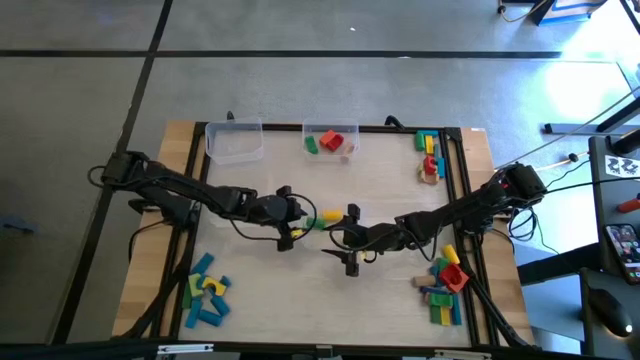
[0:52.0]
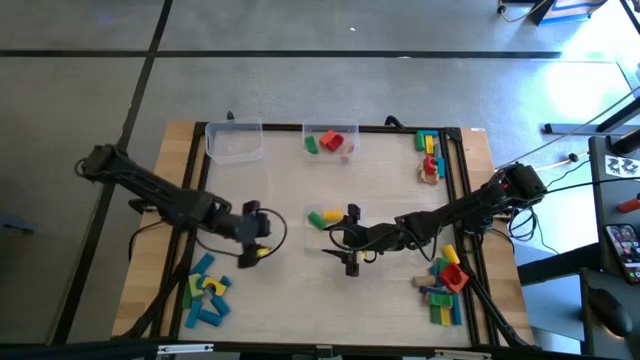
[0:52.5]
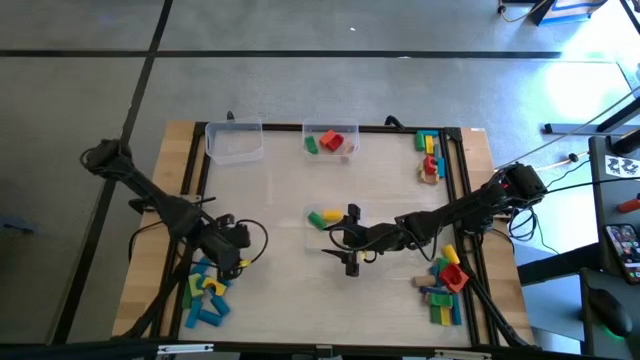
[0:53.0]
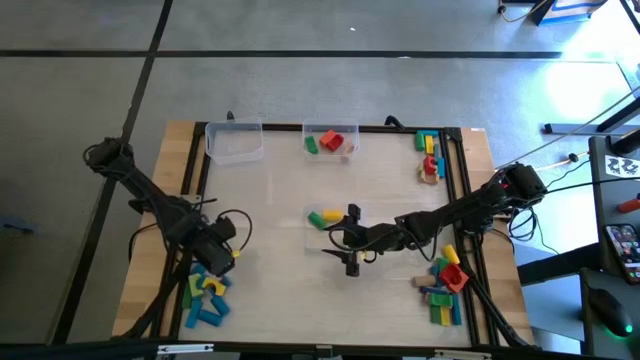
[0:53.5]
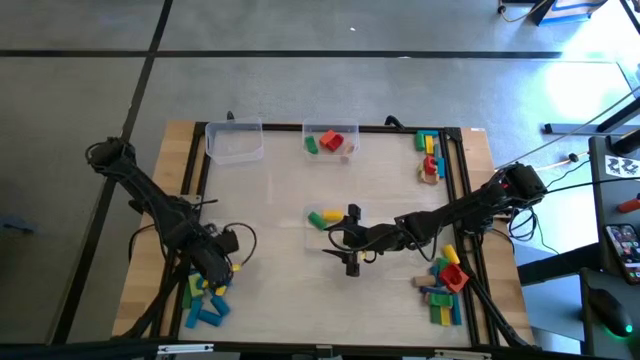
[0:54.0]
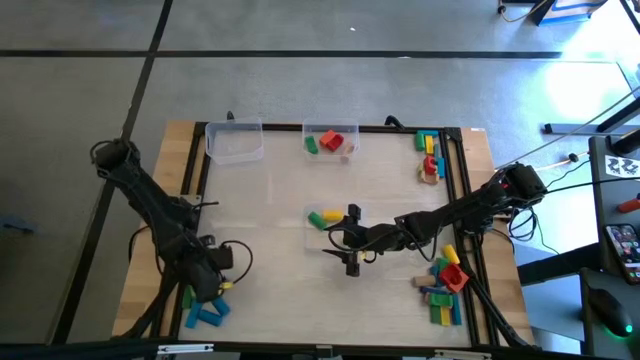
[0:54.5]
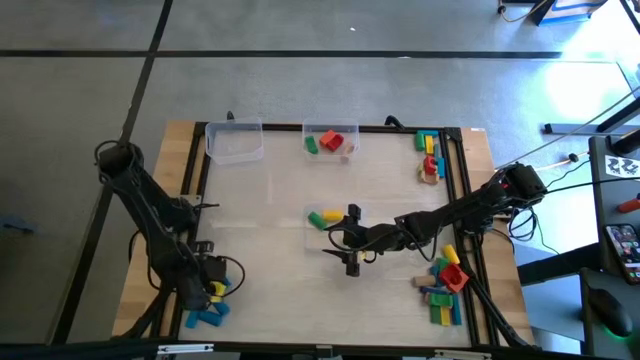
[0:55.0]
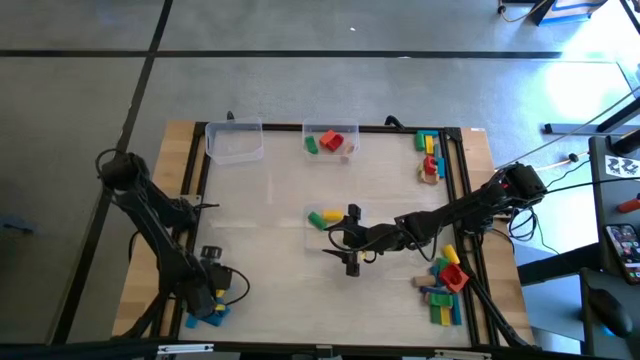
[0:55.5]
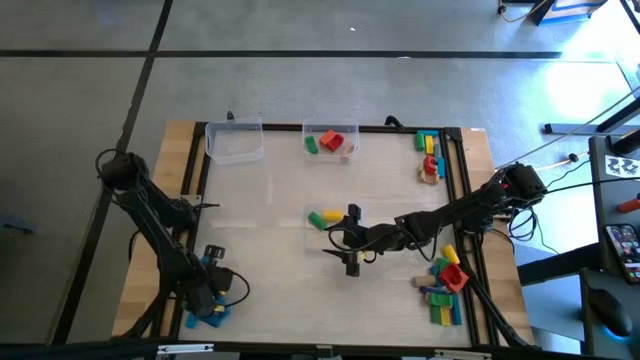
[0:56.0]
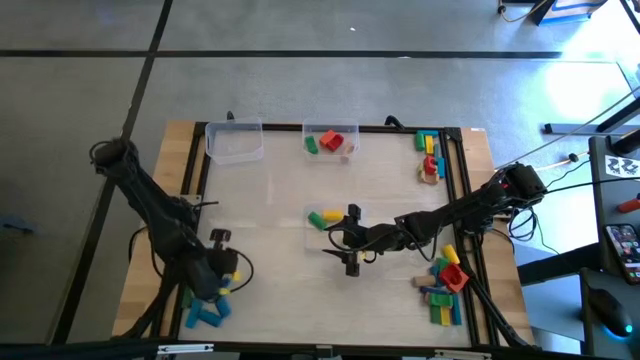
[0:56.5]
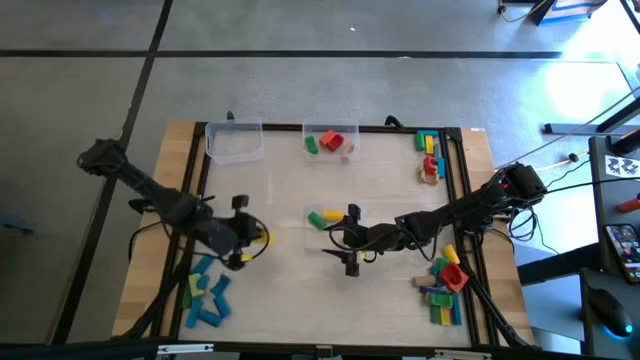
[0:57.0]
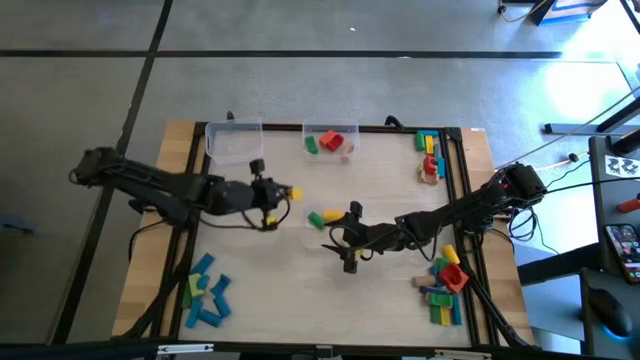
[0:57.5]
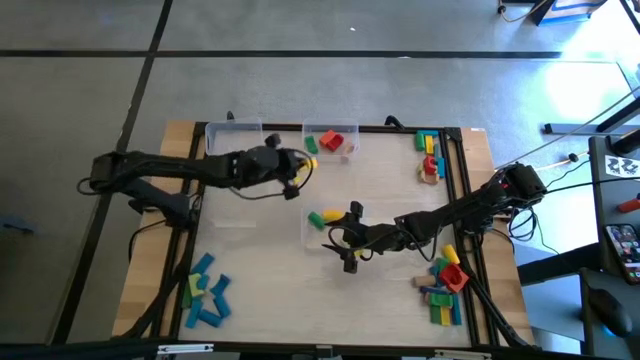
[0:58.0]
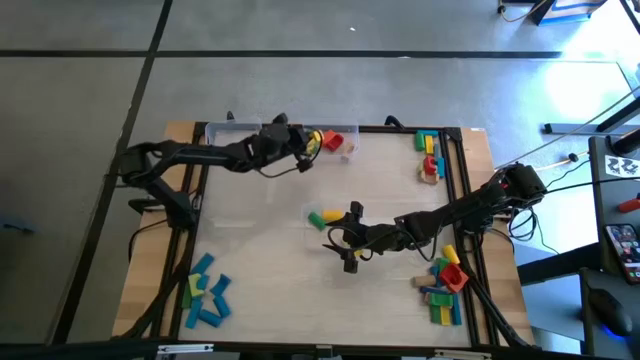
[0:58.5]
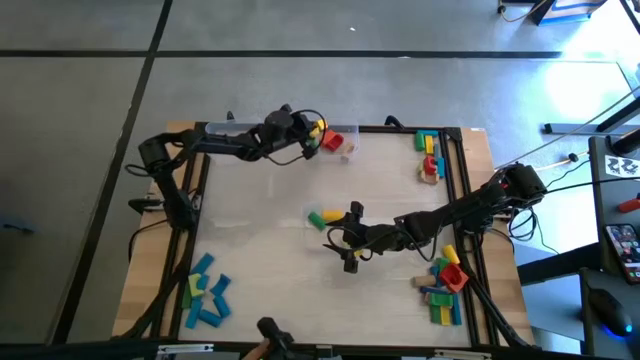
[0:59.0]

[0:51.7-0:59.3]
Task: Sort blocks by size
Put the yellow arch block into the top right transparent bin

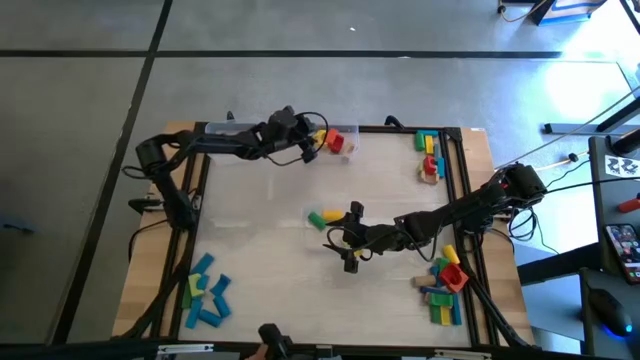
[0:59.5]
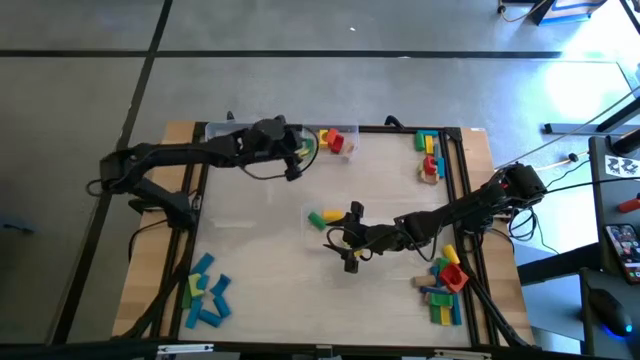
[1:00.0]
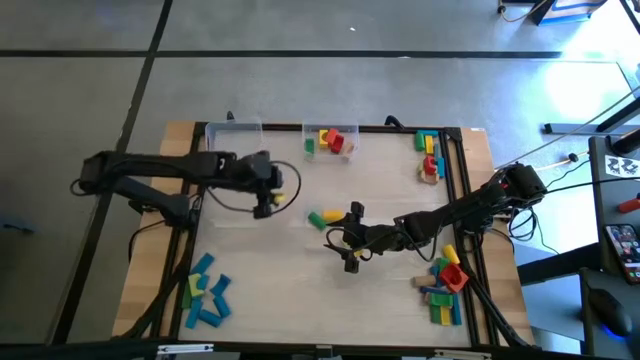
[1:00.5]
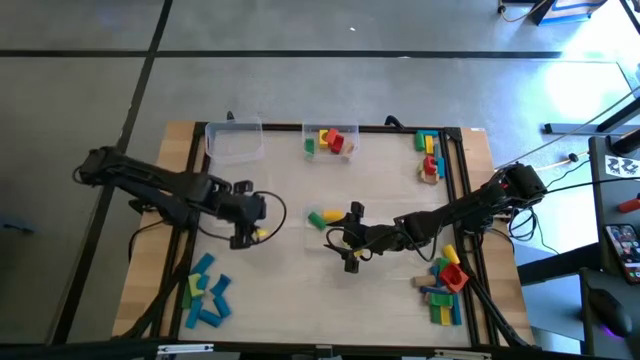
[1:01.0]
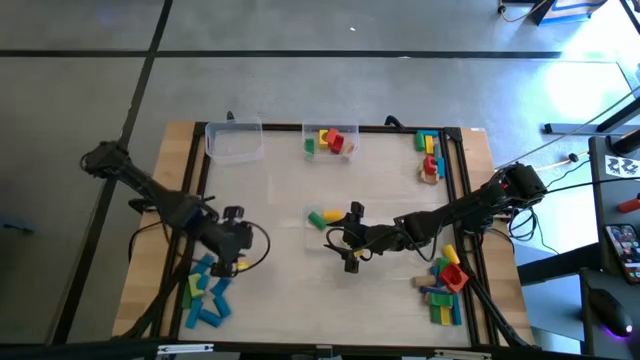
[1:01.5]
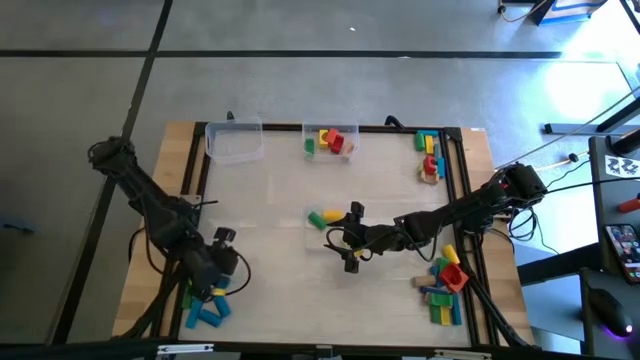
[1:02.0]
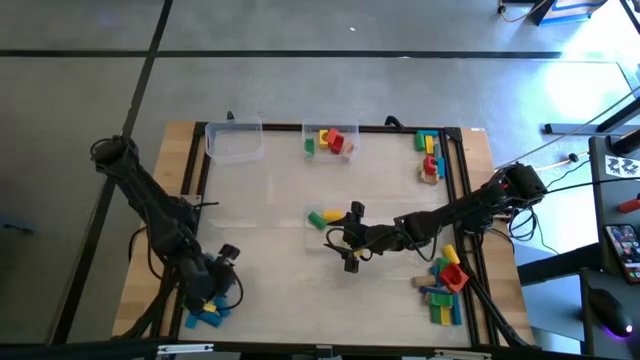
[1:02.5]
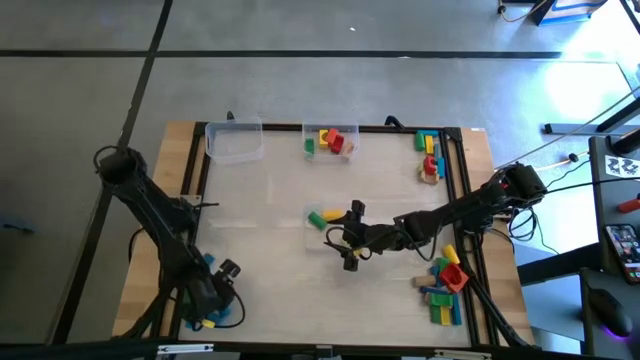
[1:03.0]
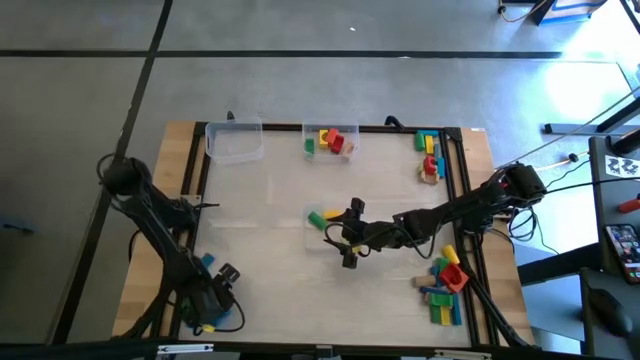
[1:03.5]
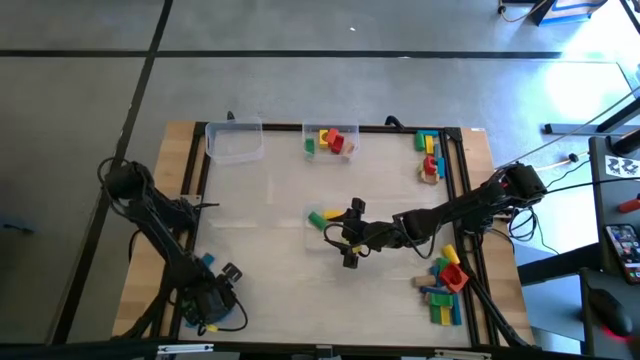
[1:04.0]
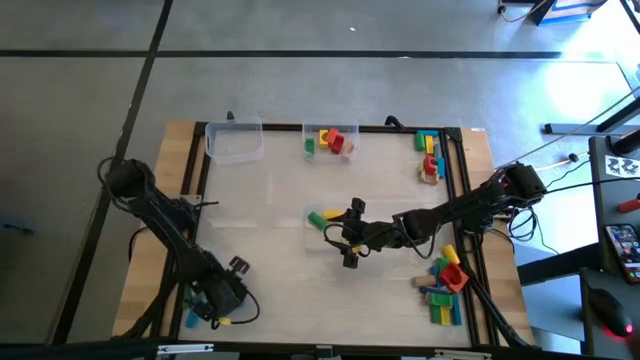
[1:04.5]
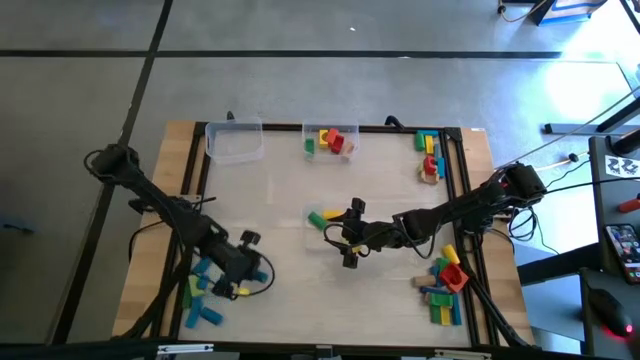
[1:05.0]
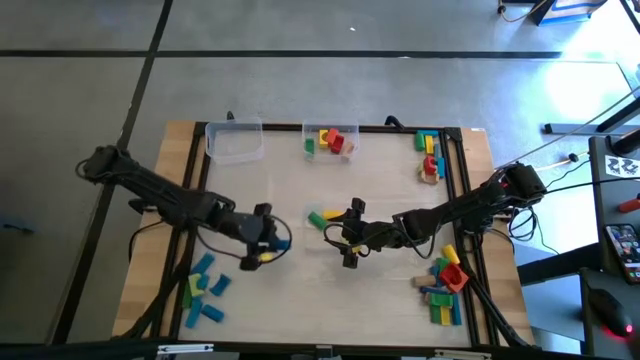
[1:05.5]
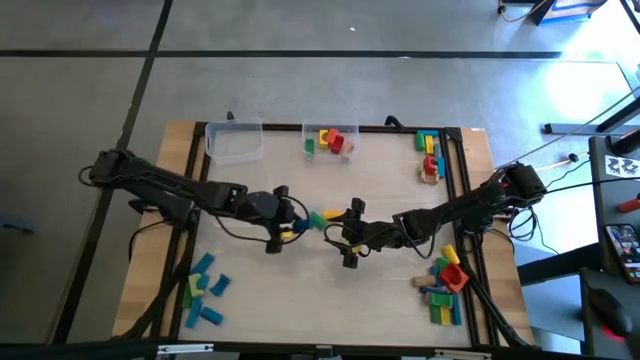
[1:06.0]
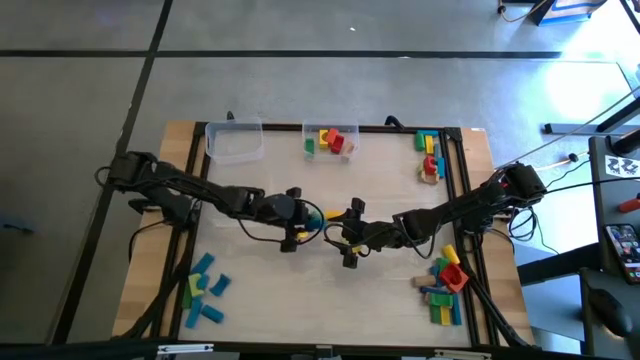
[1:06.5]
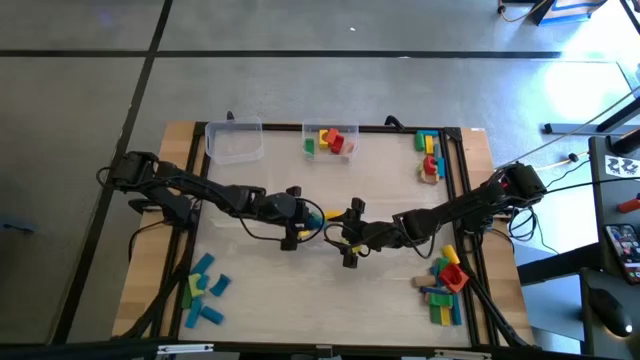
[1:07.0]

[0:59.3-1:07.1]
Put the blue cylindrical block into the bottom transparent bin

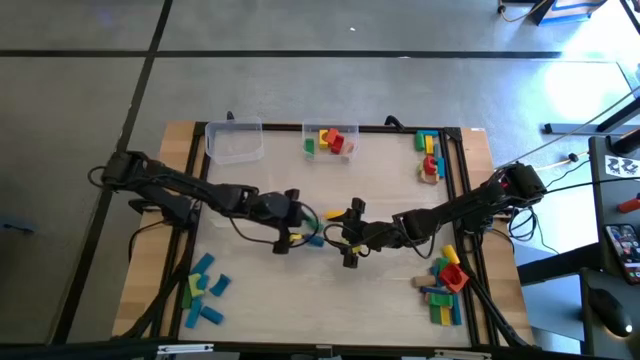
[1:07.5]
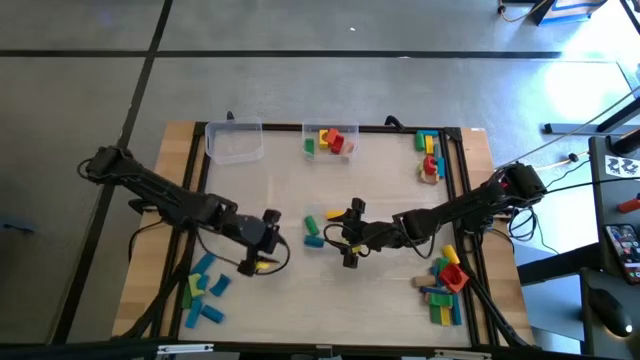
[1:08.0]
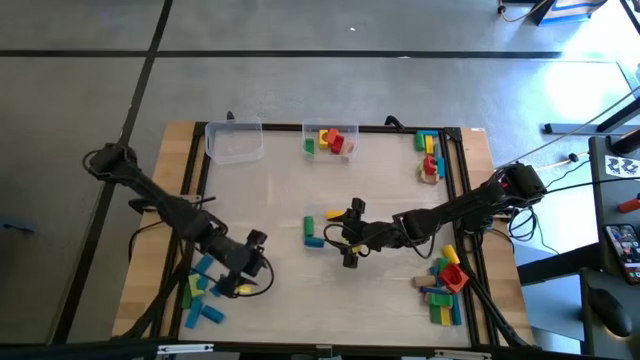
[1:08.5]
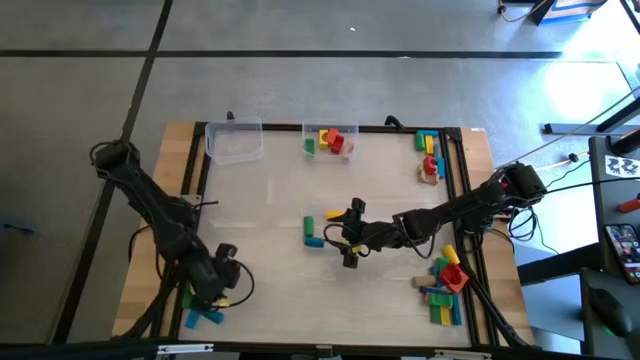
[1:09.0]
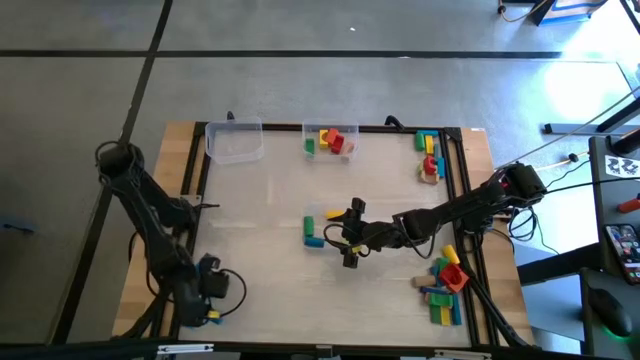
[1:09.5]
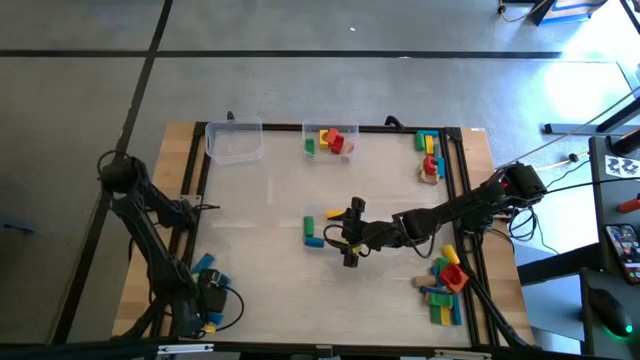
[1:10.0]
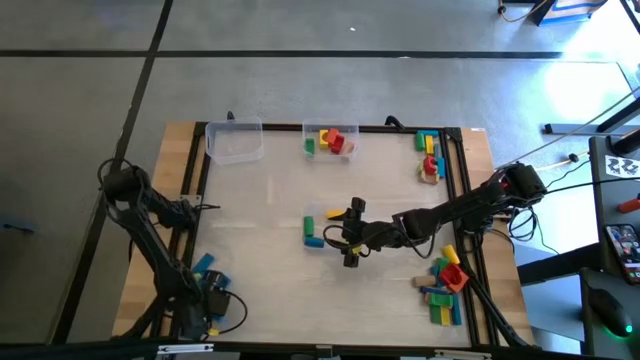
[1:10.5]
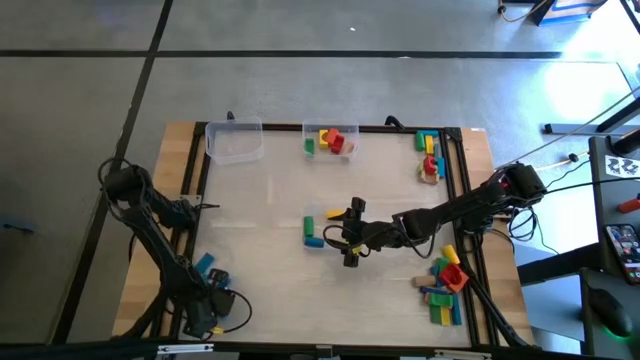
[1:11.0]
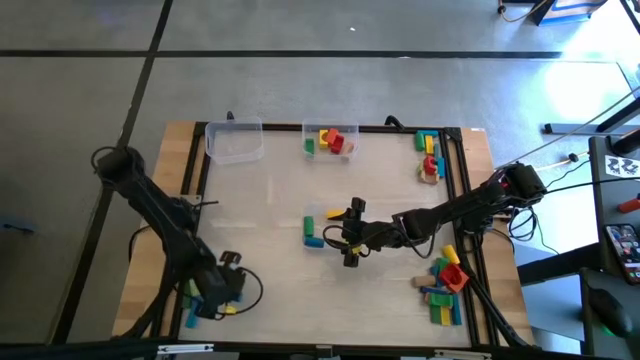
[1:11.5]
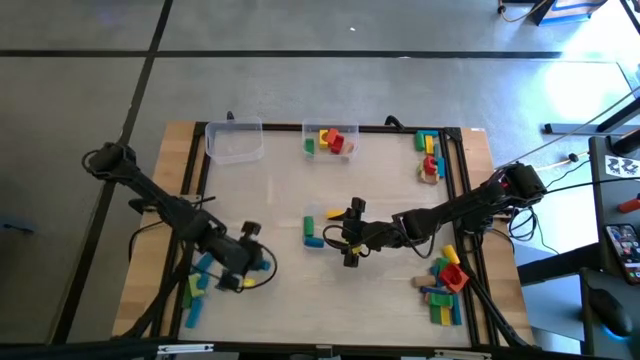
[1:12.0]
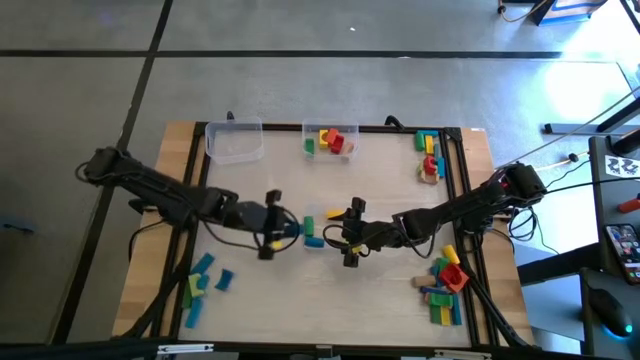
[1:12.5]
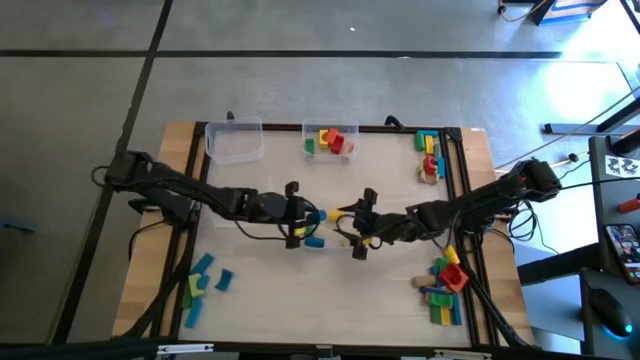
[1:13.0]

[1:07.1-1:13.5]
Put the blue cylindrical block into the bottom transparent bin
